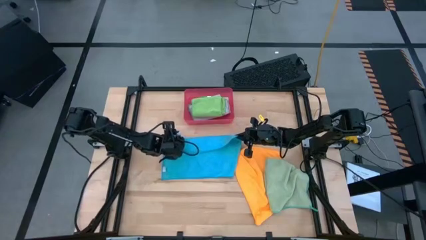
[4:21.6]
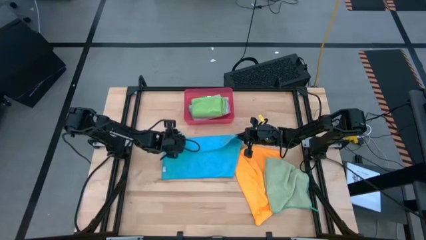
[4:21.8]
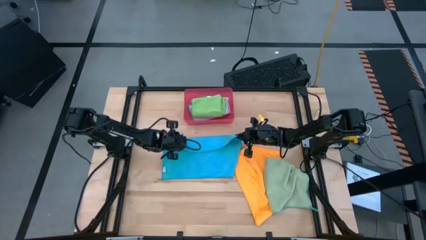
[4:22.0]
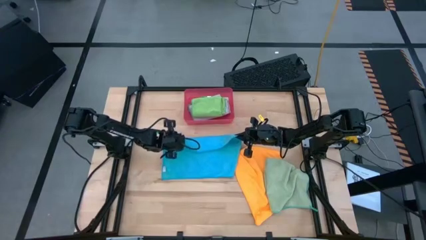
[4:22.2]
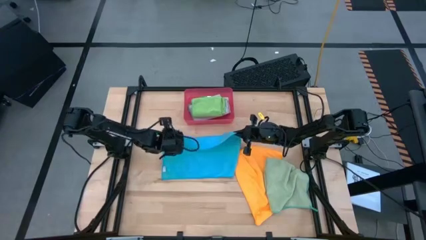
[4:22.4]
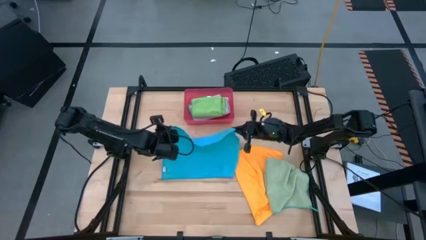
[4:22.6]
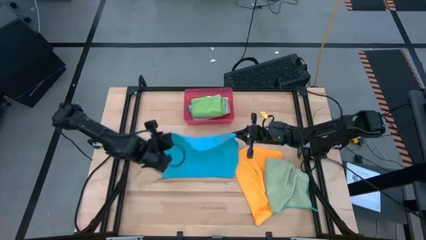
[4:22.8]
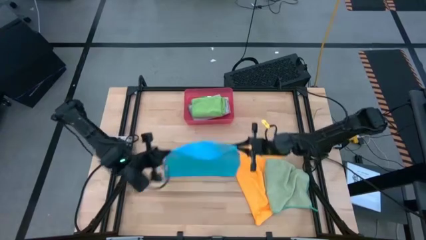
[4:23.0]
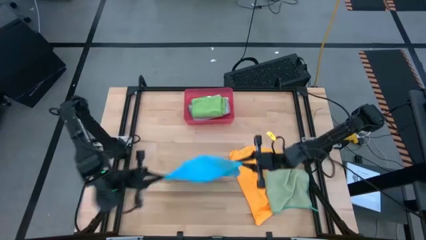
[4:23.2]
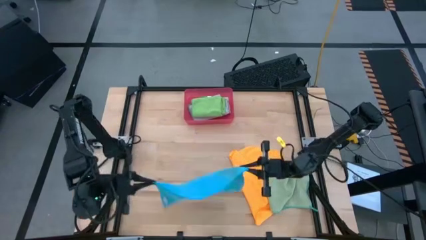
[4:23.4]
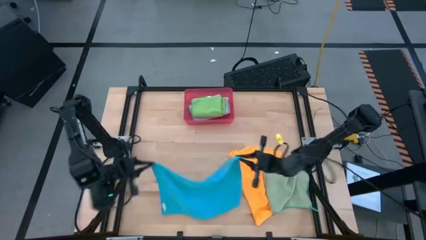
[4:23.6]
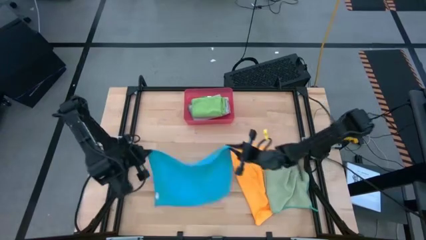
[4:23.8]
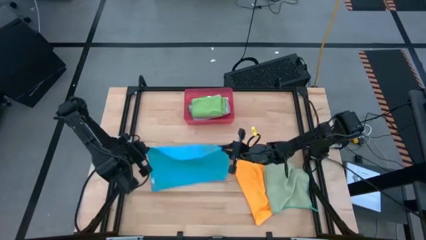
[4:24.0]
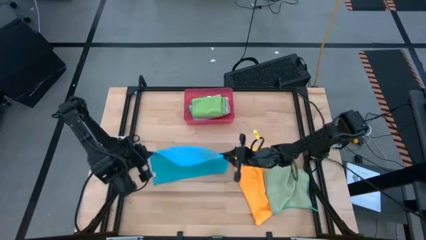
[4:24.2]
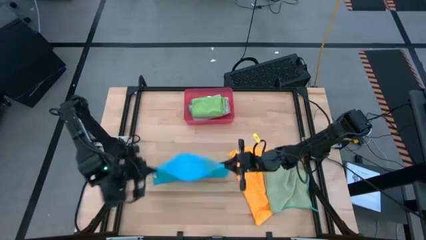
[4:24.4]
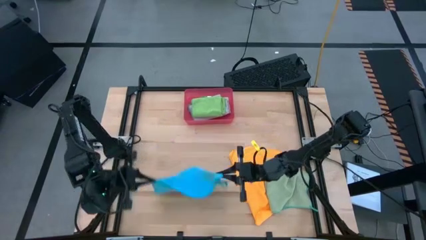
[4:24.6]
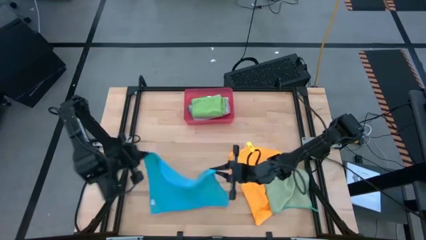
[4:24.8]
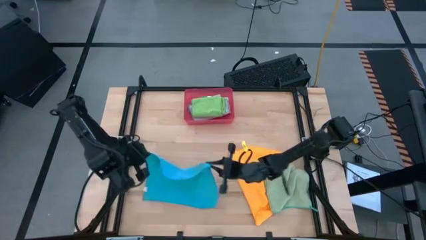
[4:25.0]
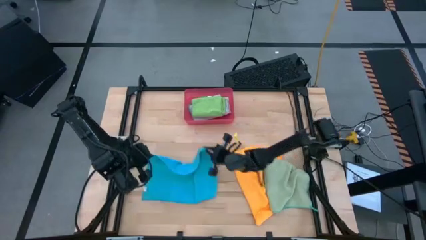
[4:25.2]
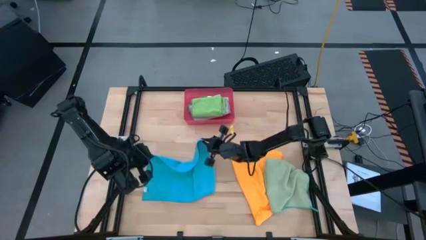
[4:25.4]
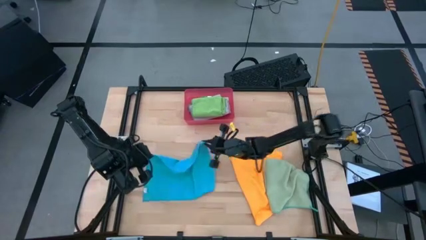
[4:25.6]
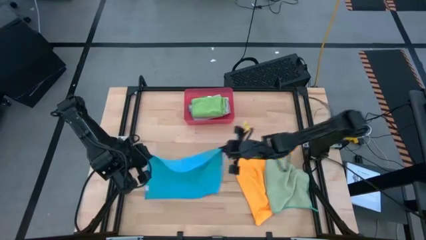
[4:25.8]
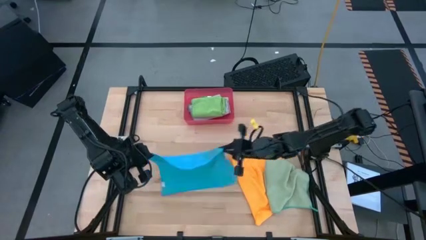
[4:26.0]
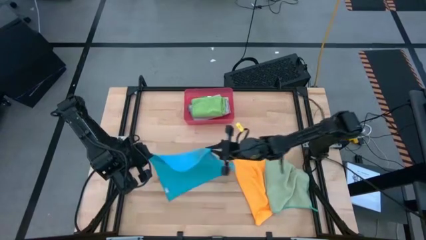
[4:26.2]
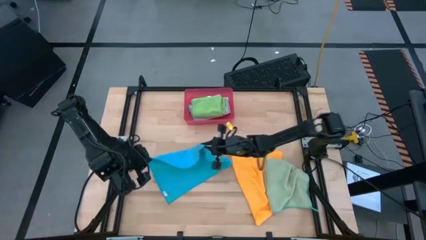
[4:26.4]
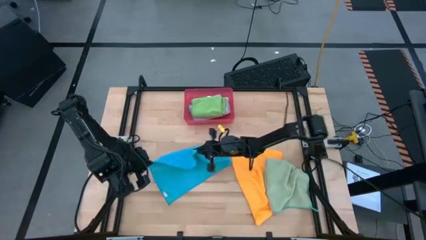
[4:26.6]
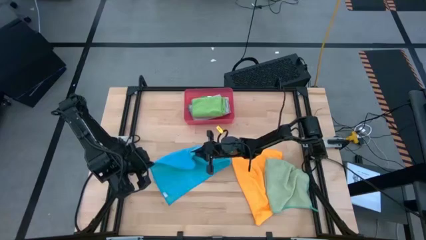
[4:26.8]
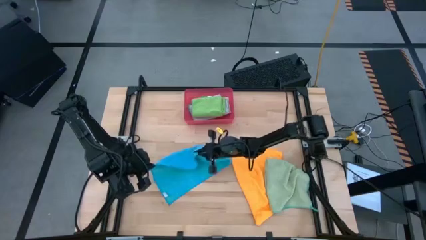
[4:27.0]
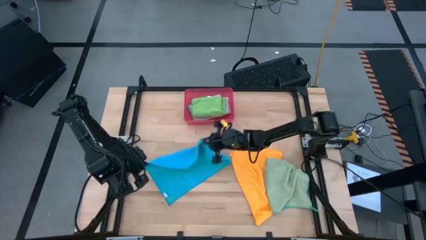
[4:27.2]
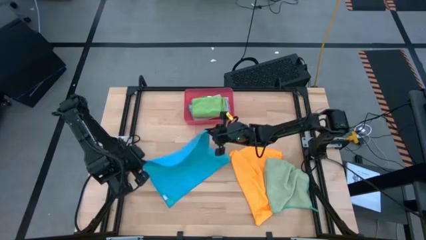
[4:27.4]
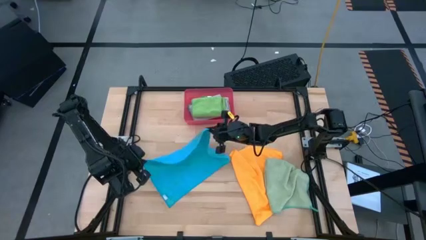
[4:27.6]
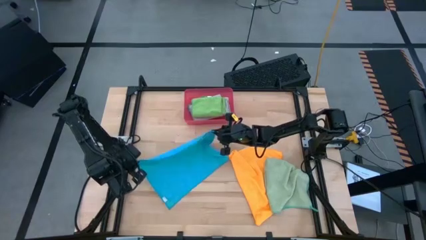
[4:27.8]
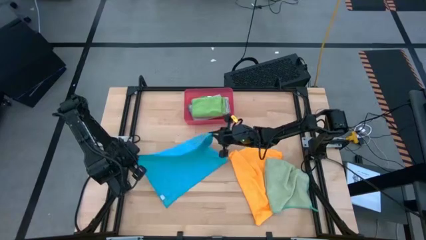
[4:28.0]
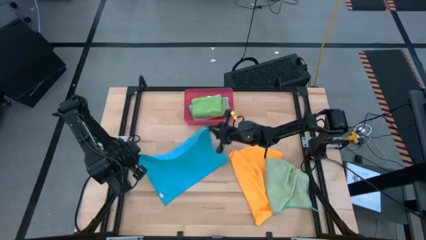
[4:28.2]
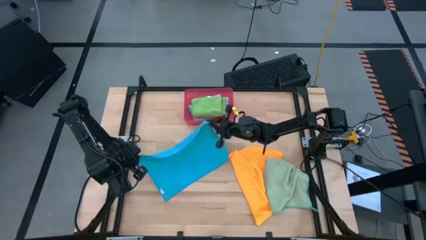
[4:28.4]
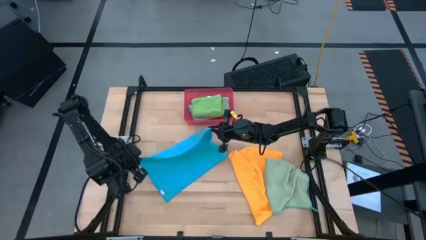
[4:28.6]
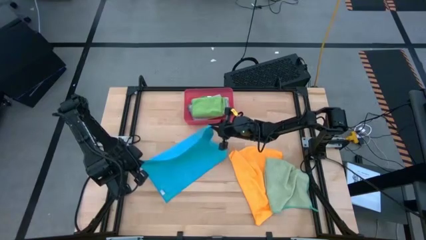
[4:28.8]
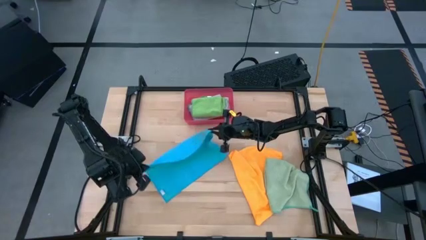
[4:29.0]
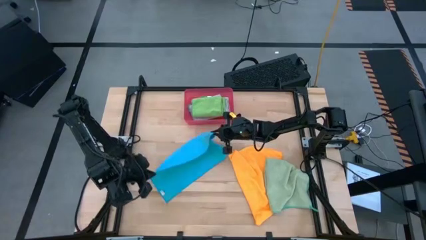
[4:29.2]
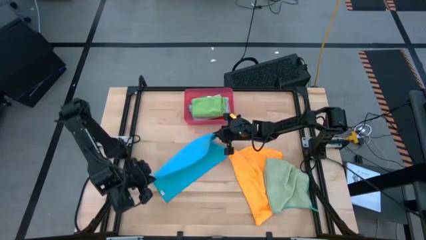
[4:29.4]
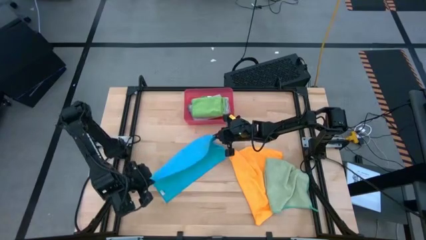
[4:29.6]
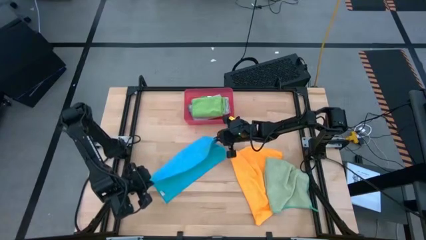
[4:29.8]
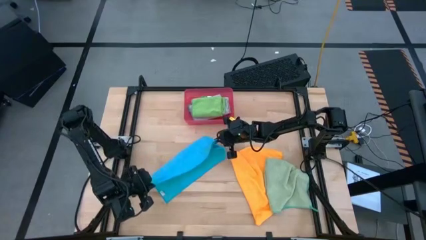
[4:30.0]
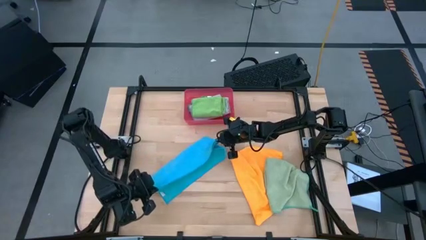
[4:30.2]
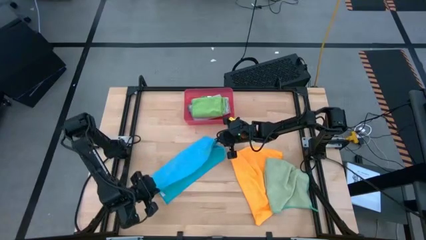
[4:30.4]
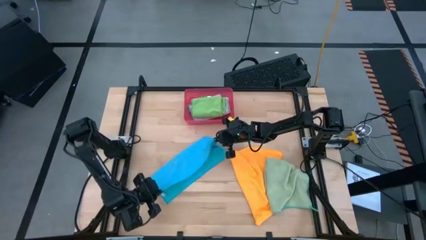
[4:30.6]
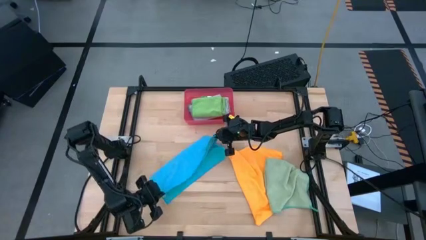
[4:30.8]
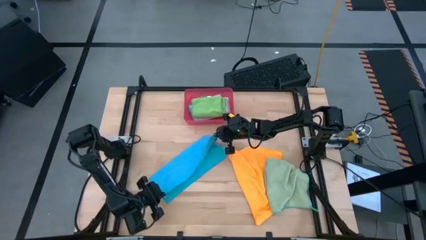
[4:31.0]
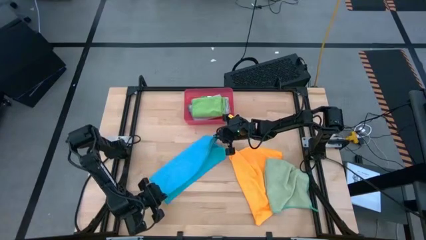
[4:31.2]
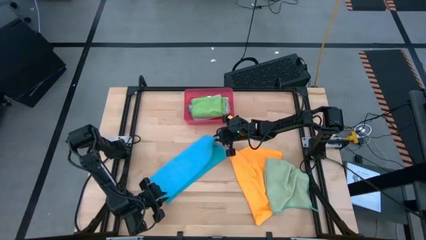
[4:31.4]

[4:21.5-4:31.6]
Task: Fold microfiber towels
Fold the blue towel

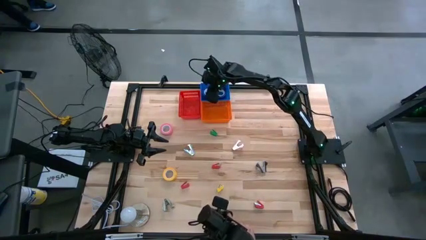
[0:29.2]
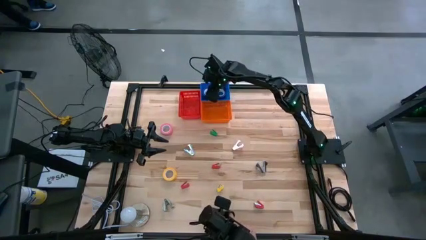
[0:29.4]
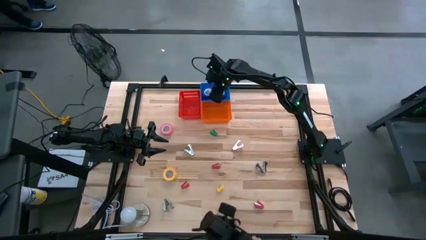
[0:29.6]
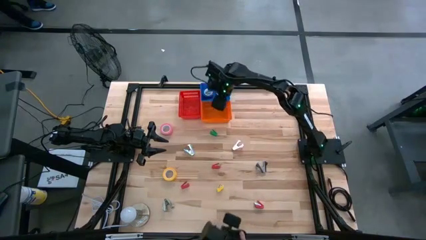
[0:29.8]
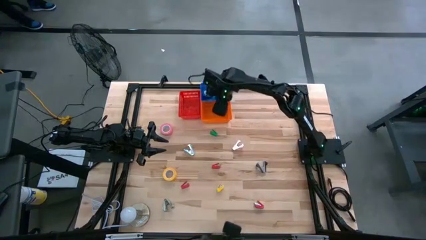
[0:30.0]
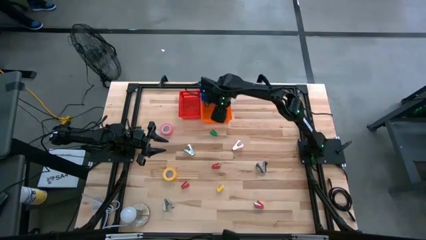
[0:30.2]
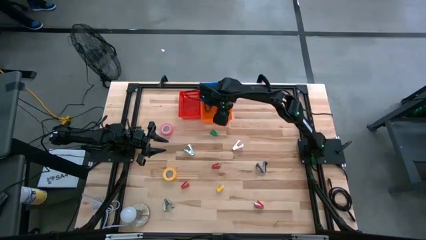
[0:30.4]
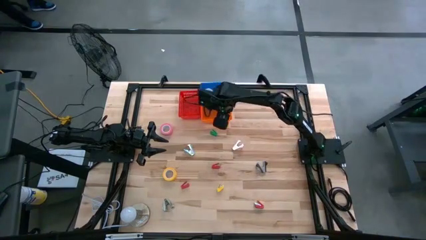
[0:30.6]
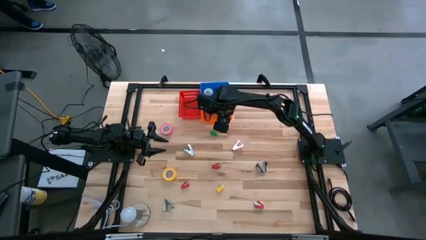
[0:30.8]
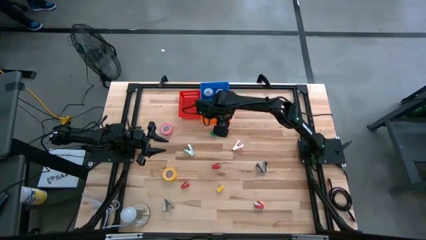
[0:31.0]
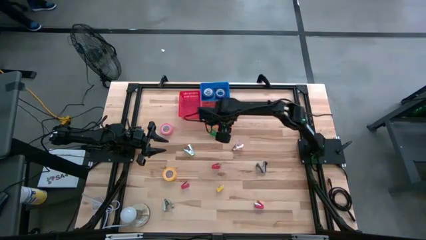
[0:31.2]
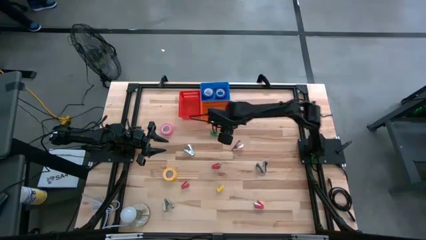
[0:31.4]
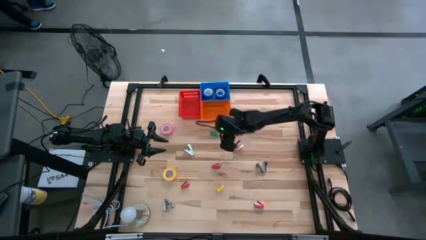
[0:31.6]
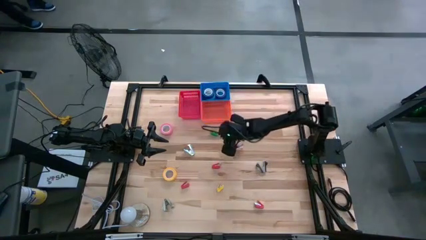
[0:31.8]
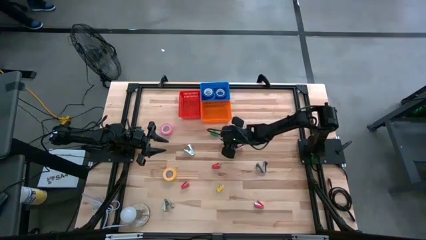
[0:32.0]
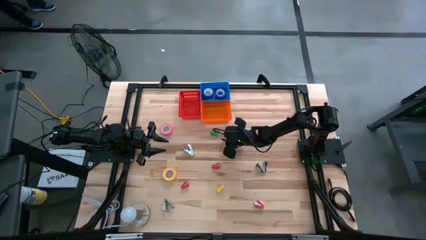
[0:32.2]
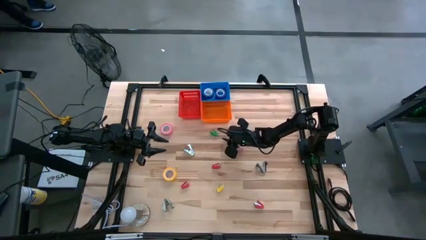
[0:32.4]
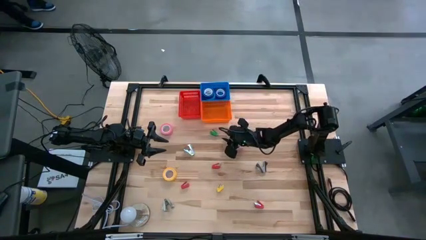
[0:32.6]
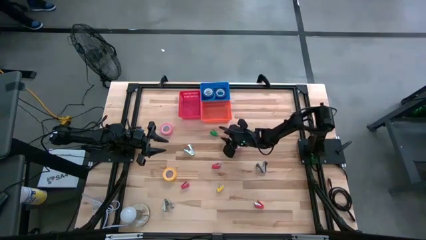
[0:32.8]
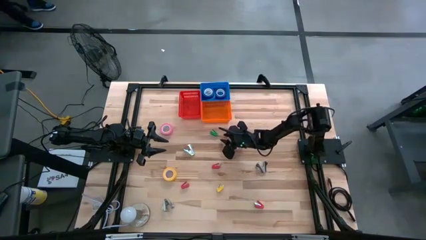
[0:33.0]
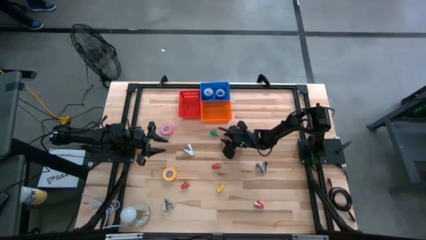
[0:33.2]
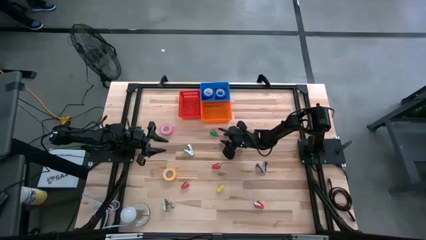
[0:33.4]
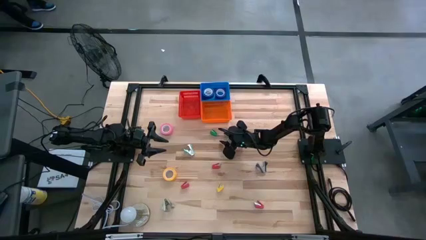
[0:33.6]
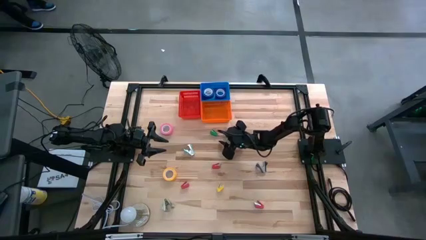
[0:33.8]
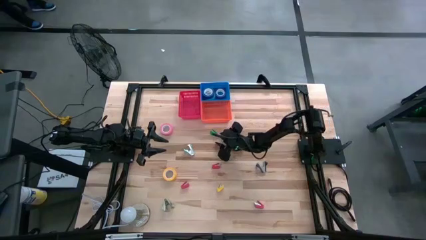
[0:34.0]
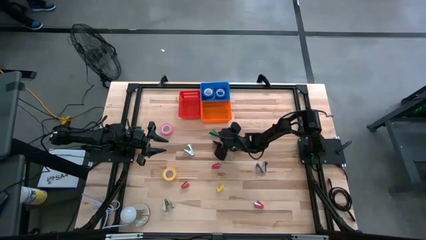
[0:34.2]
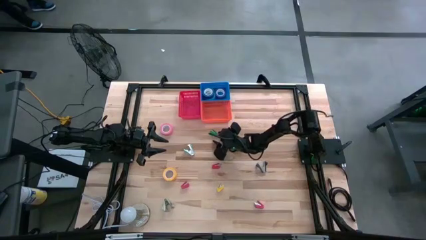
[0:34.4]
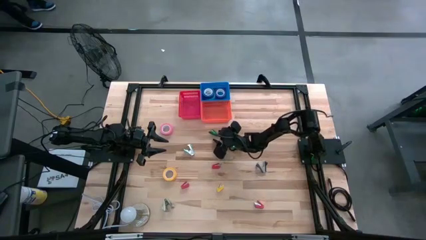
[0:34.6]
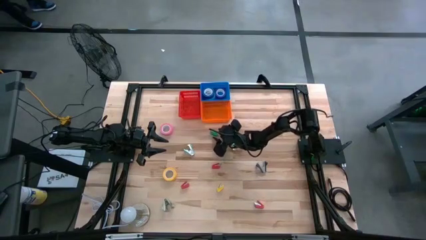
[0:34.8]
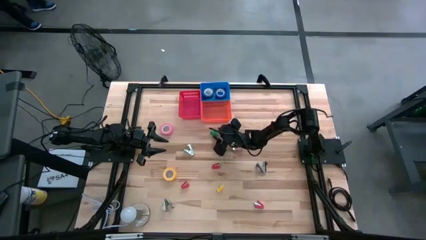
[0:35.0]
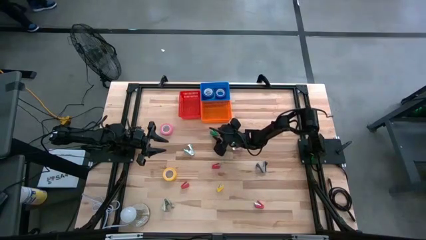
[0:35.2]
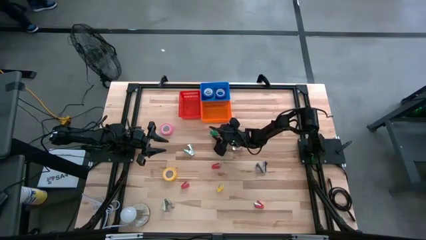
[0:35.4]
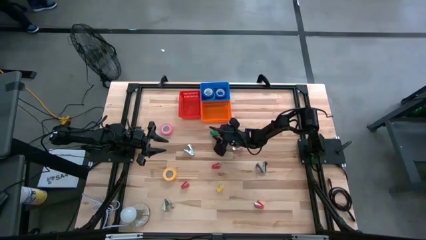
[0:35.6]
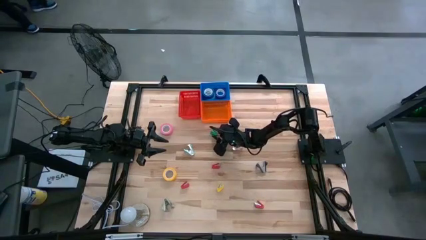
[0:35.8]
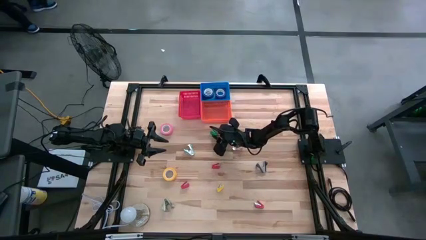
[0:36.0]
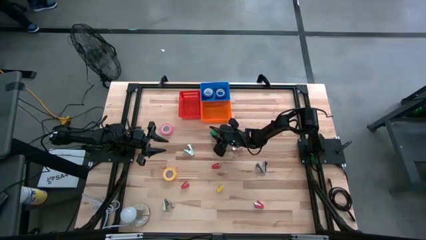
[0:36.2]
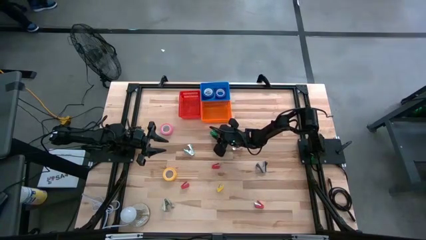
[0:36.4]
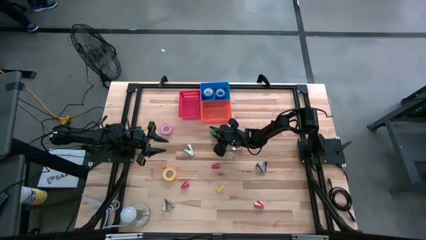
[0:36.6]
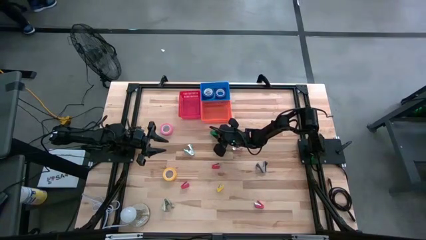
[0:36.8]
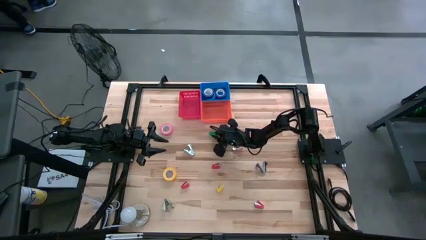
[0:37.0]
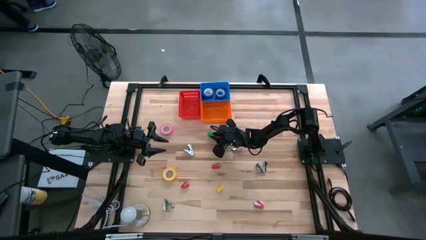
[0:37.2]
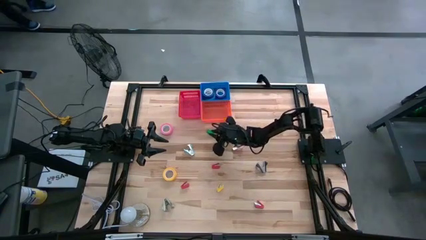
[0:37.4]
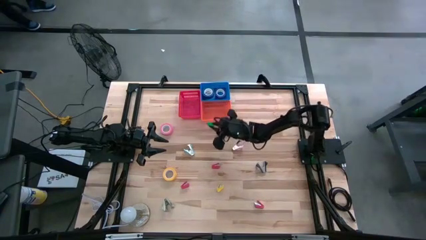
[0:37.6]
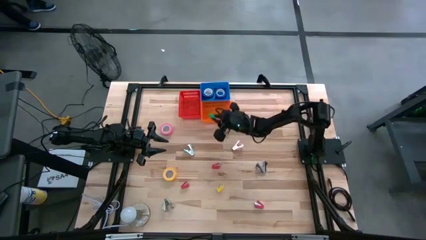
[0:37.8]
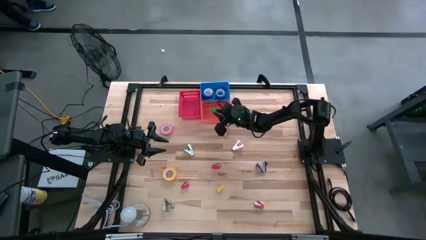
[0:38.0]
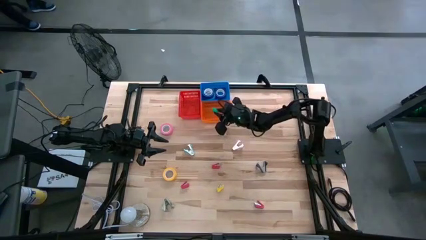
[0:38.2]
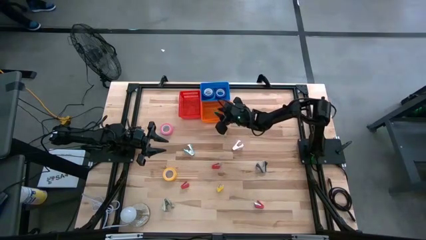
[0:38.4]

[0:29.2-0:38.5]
Task: Pick and place Stapler, Stapler remover, tape
Put the green stapler into the orange bin
